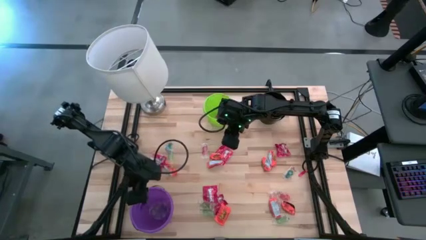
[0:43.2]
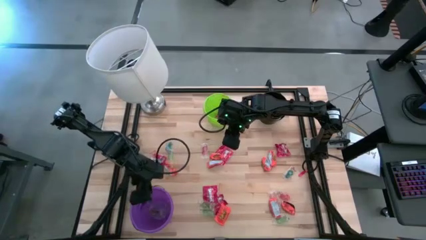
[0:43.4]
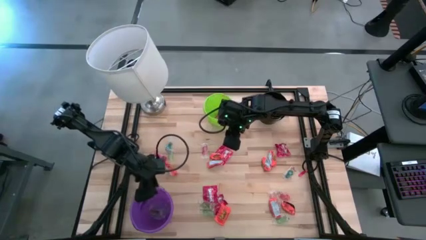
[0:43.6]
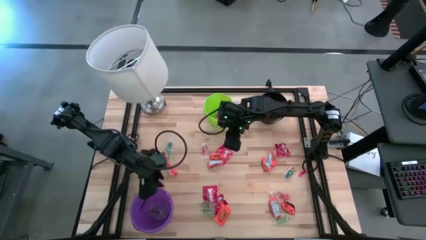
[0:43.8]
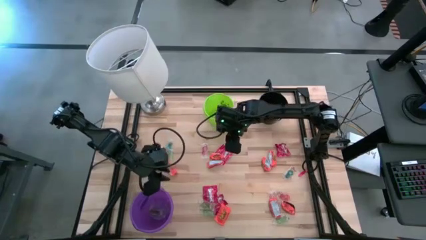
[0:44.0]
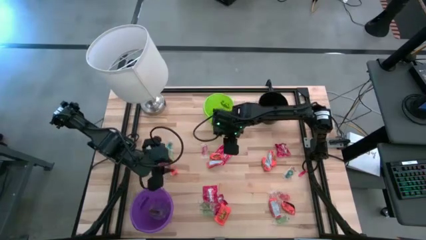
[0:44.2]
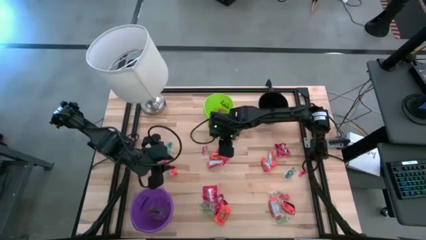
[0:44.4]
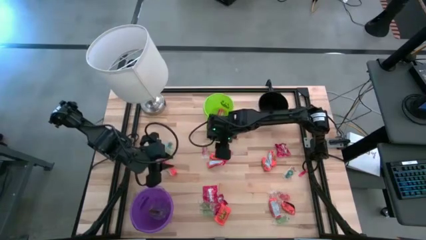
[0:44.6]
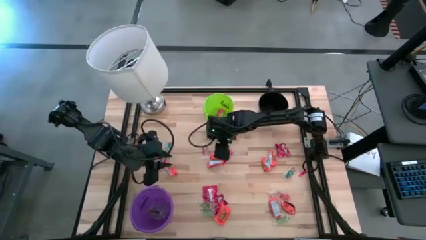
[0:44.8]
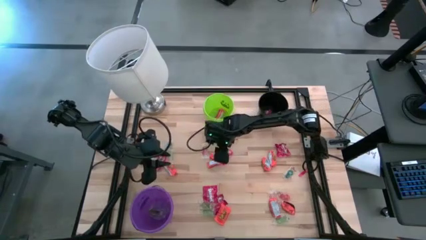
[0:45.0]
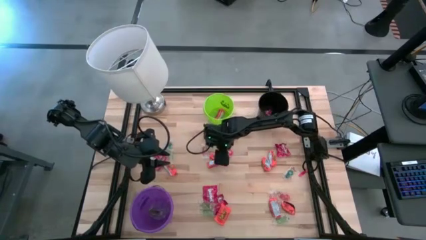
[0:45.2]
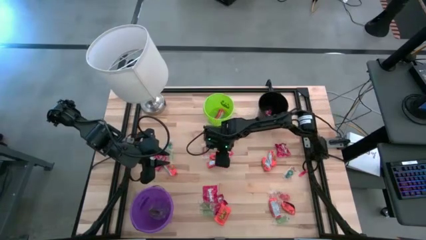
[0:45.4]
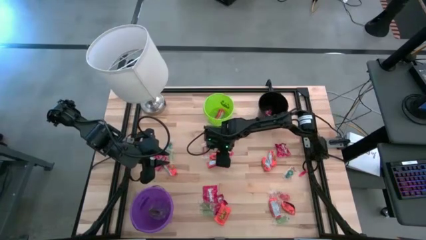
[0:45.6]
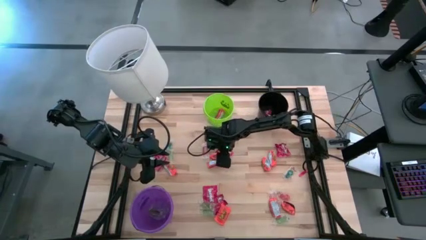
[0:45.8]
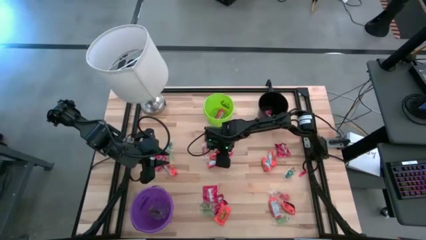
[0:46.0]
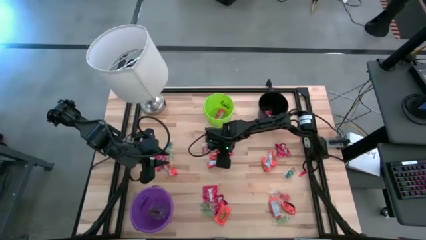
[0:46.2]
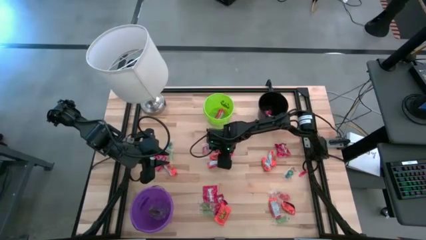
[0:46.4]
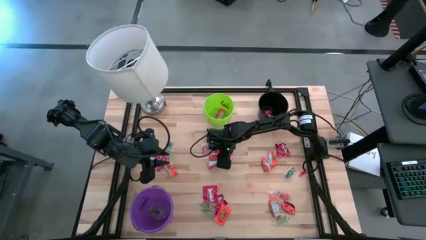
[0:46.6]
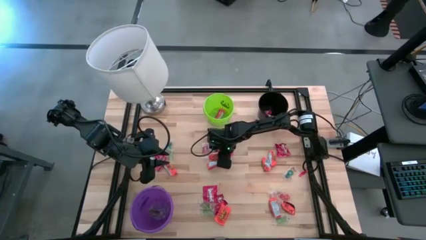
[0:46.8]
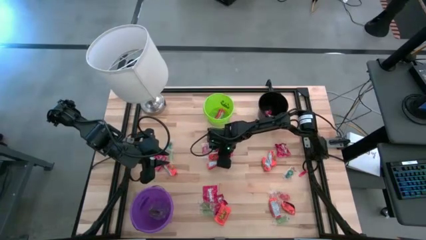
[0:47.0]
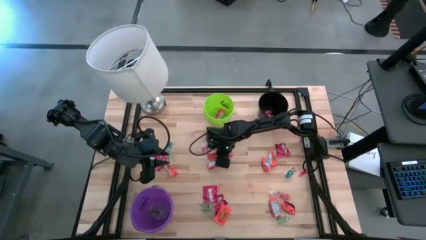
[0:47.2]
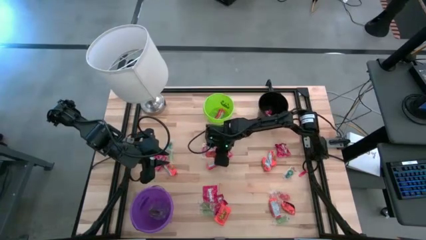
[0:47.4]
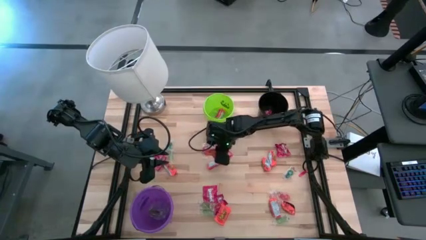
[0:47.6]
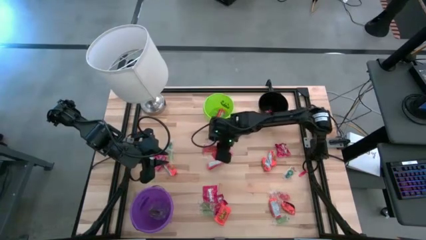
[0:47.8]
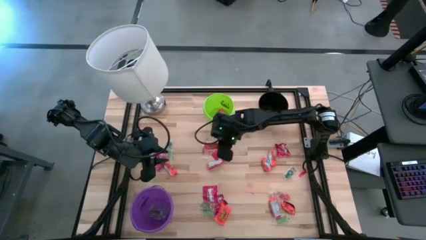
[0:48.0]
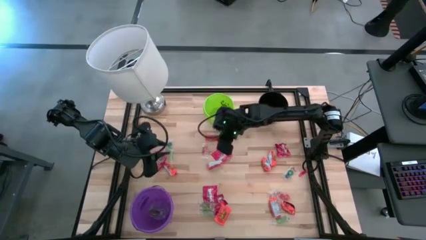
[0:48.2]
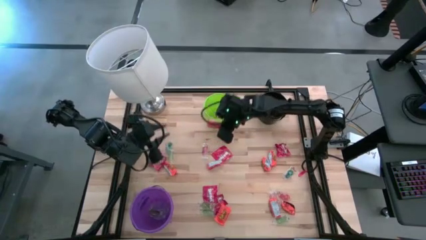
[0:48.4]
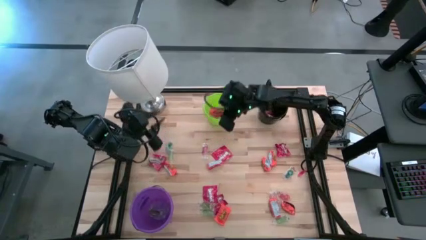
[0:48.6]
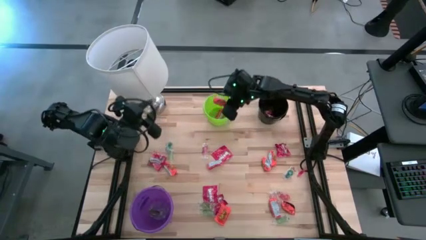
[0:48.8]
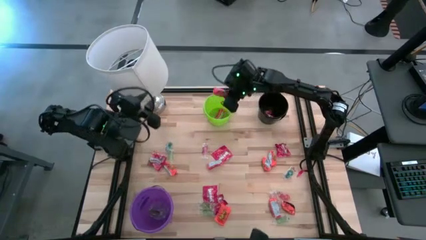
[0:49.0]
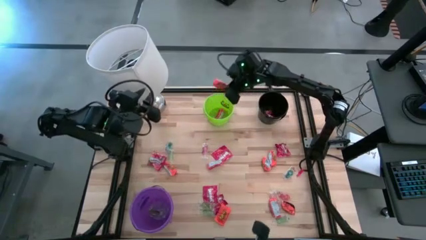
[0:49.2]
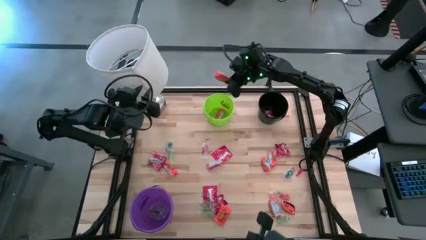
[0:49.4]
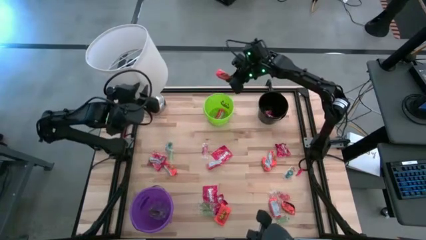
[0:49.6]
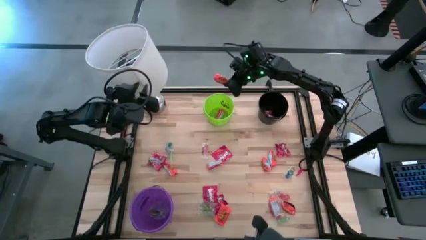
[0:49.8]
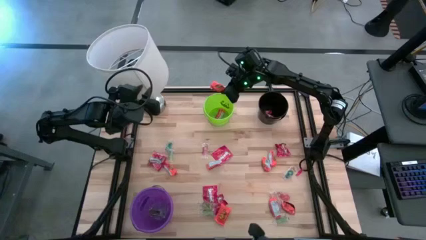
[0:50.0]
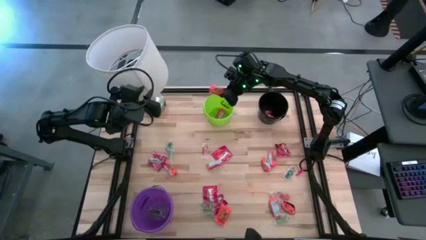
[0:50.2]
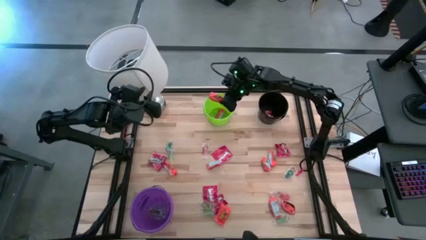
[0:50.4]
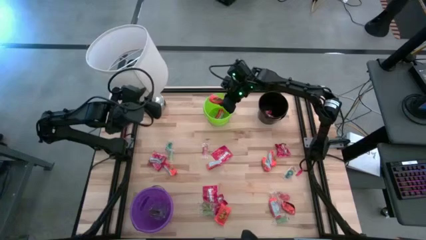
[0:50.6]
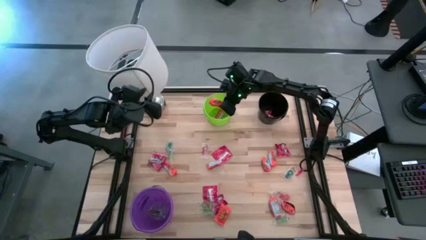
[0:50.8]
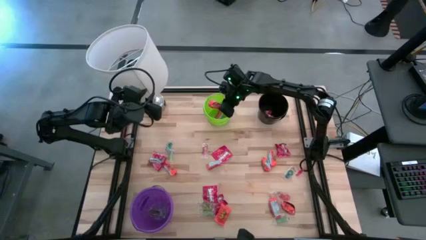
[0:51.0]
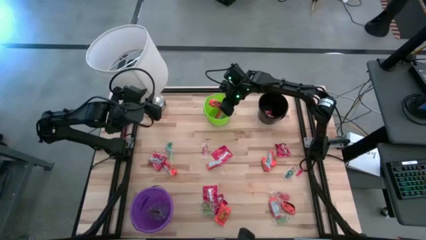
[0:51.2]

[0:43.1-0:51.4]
Task: Sort candy
Put the orange chocolate into the green bucket

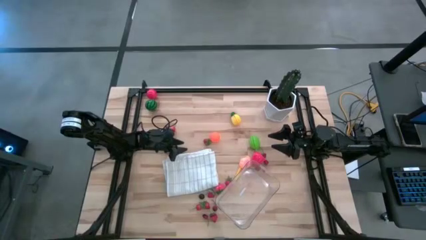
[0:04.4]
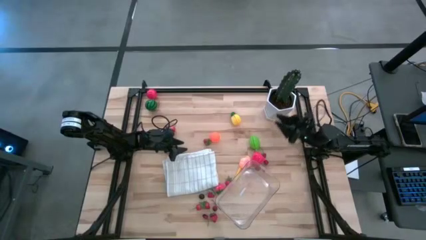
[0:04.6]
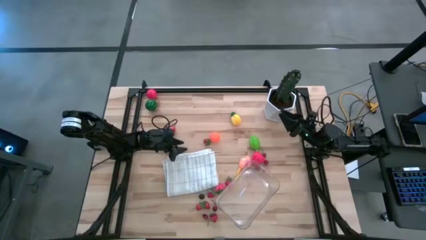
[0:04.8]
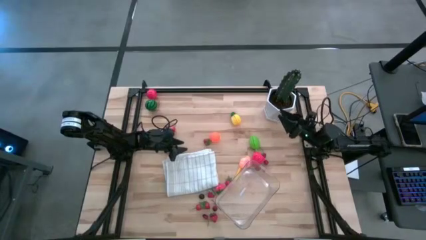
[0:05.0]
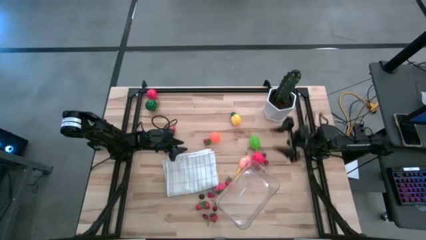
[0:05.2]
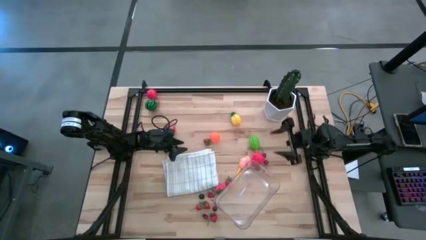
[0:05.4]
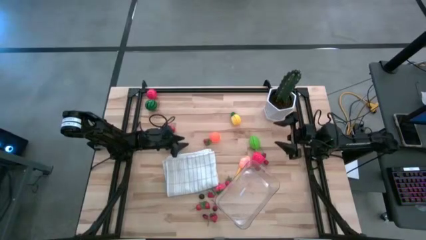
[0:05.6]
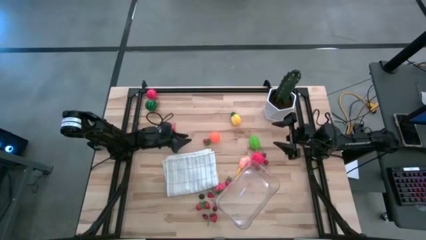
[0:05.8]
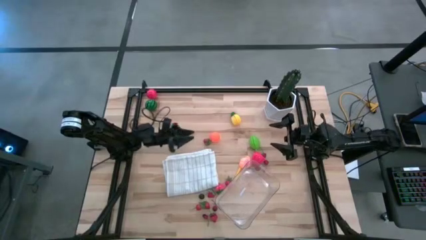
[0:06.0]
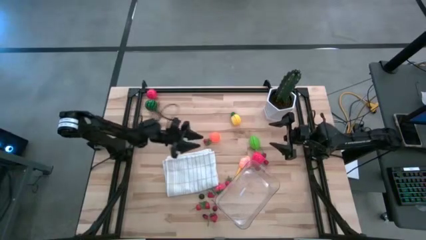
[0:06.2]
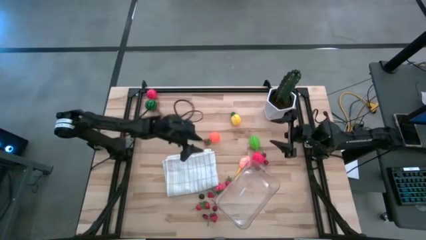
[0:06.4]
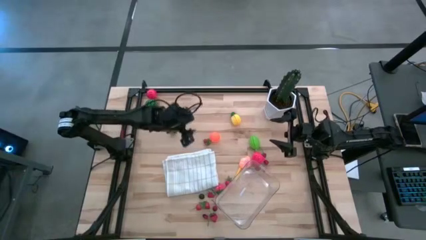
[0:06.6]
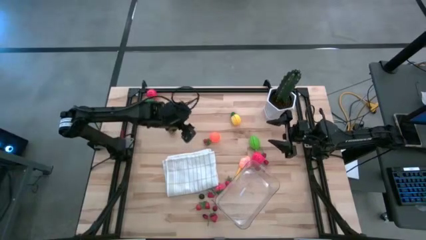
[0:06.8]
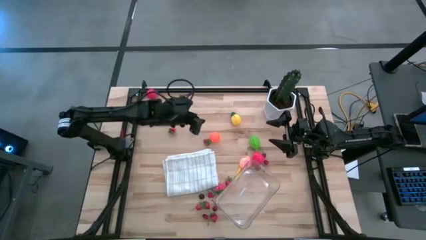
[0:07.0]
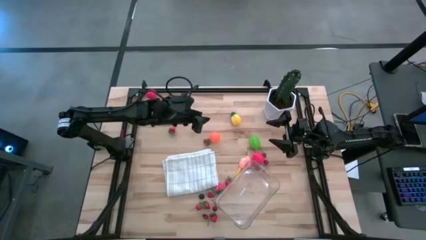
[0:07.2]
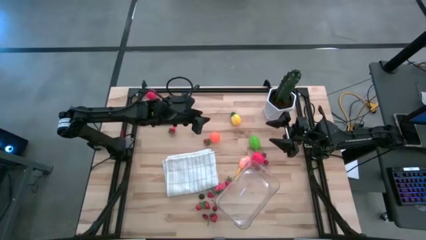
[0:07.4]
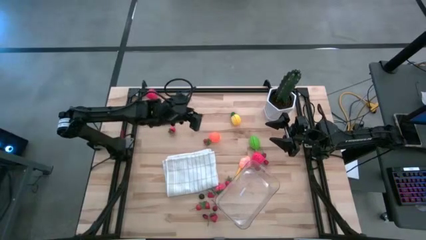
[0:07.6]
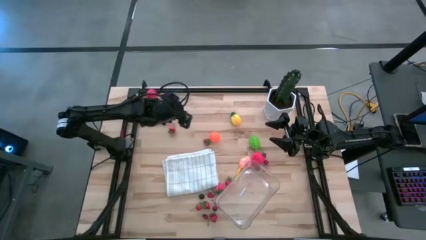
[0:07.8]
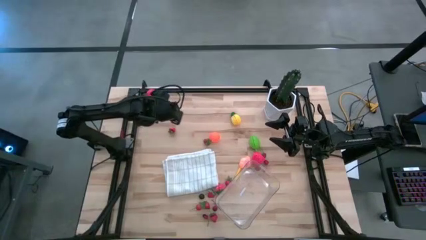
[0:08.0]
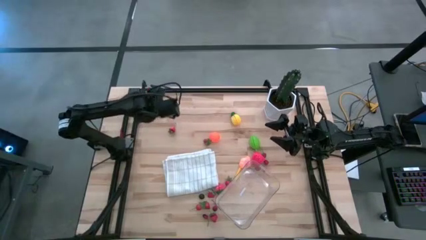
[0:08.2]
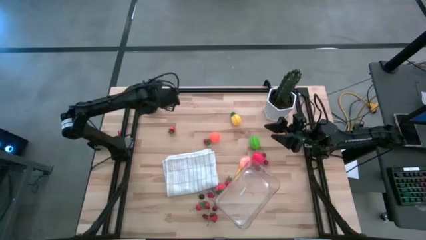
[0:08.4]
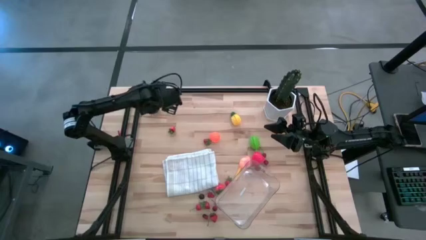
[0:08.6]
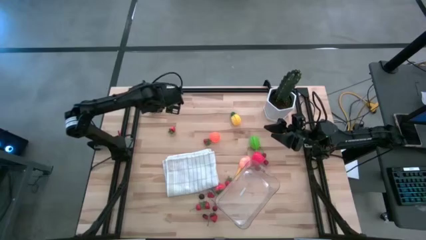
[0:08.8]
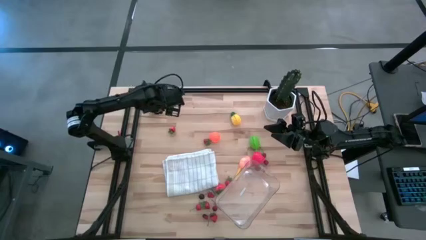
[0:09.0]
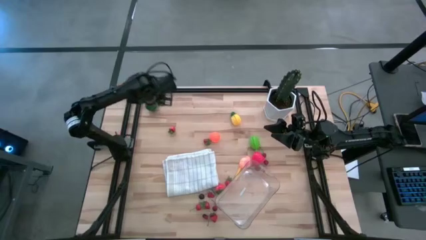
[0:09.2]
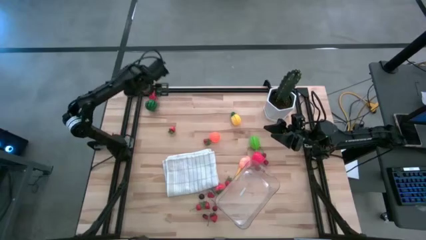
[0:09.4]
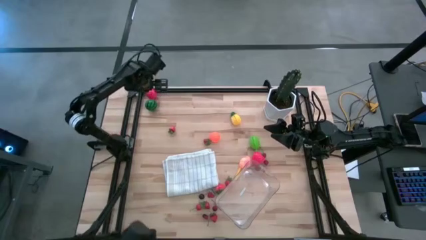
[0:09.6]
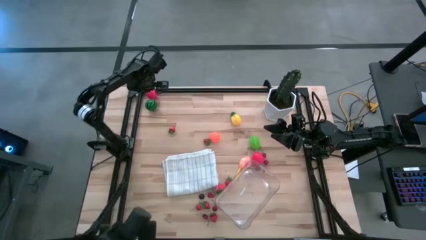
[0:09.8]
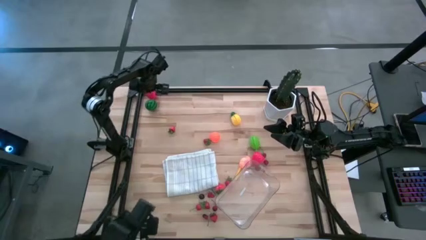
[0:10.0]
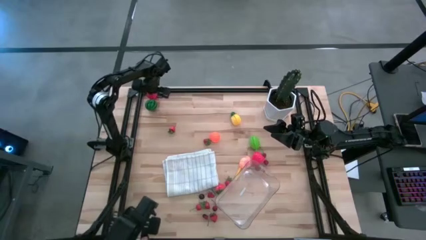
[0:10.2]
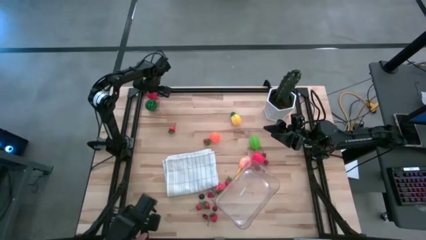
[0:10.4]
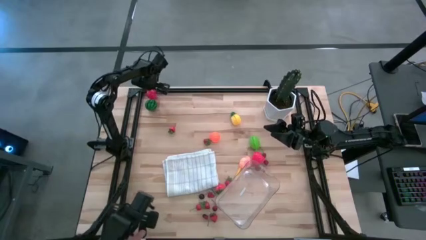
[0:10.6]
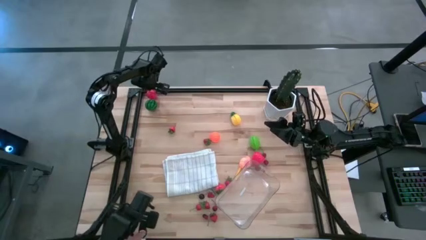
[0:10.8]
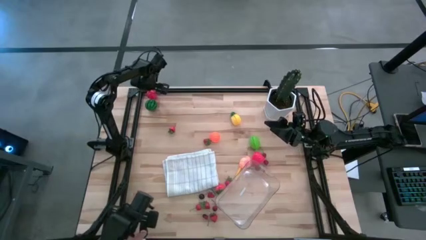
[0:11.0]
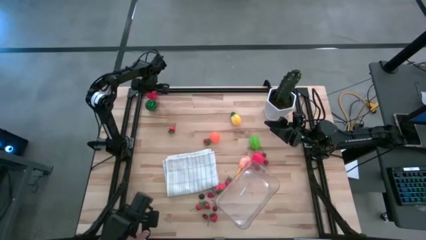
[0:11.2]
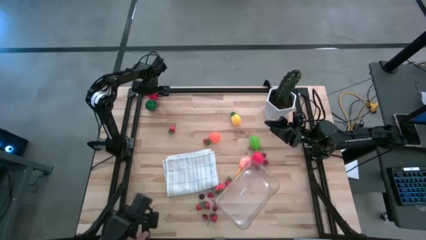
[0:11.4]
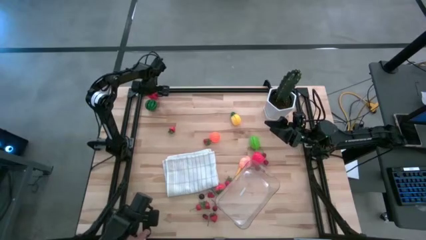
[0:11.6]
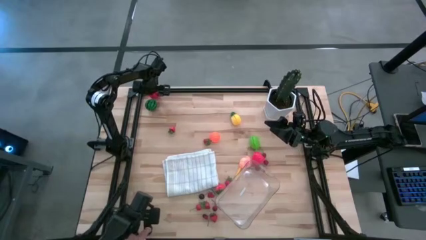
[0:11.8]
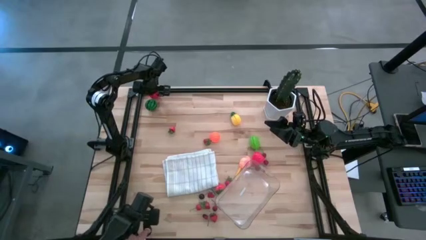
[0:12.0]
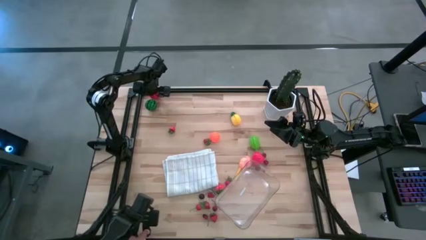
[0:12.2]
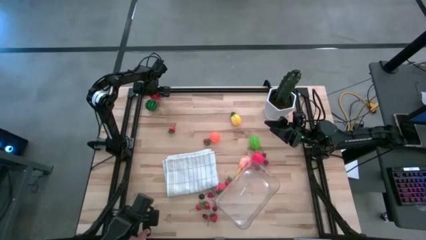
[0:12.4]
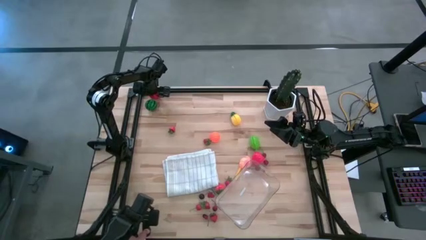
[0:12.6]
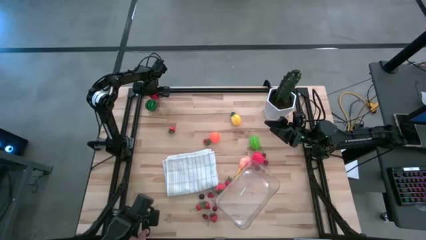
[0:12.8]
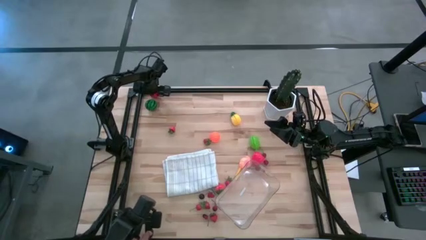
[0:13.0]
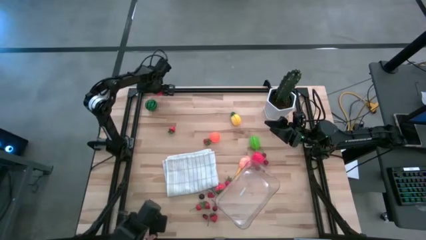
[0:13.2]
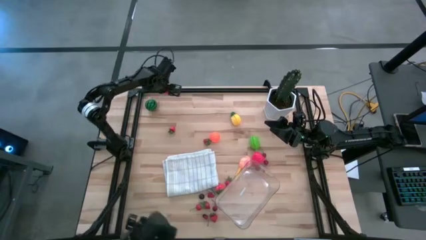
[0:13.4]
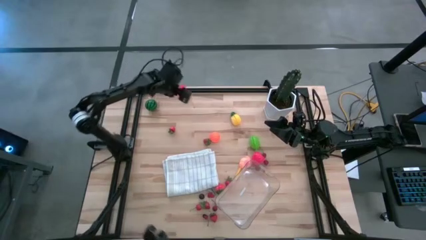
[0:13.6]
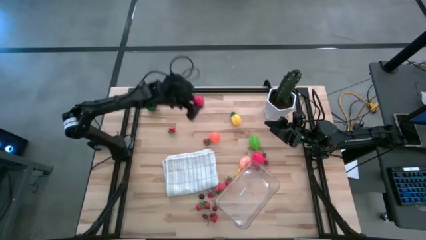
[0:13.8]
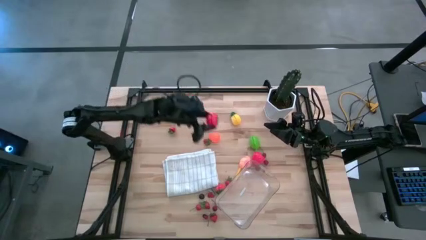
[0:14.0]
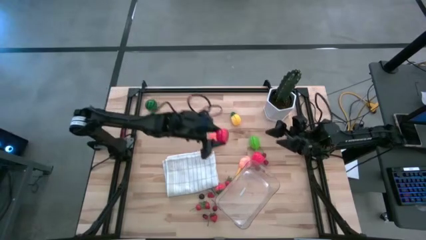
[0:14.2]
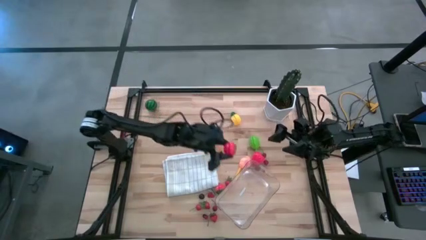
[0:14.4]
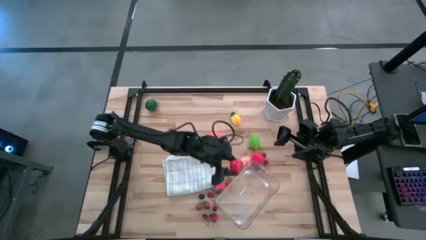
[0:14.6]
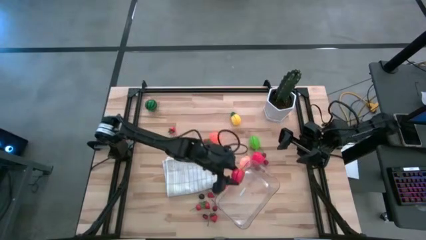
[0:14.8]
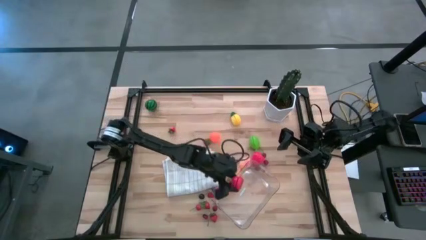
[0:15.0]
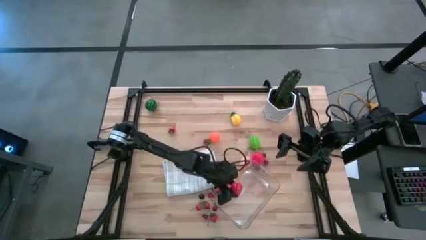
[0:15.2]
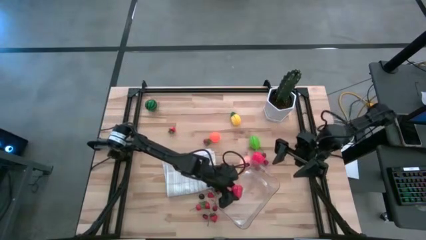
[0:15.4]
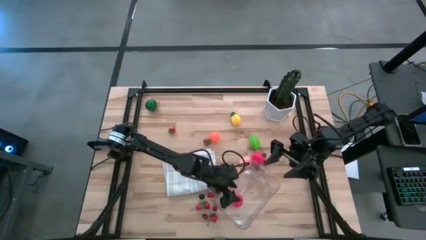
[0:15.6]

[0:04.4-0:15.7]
Task: Pick and placing Produce into tupperware
Put the tomato into the transparent bin
